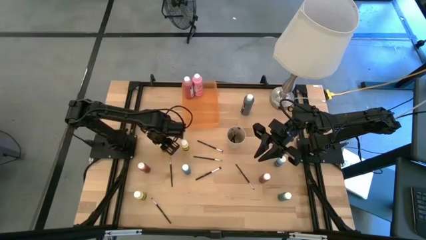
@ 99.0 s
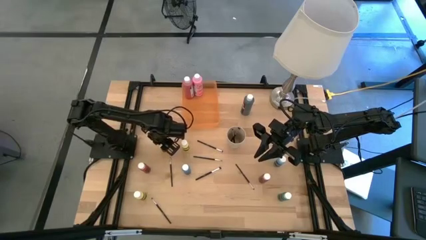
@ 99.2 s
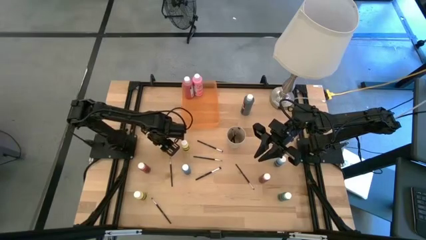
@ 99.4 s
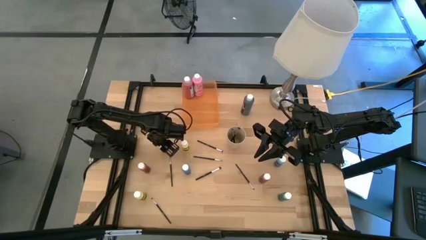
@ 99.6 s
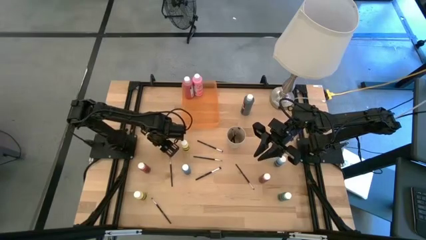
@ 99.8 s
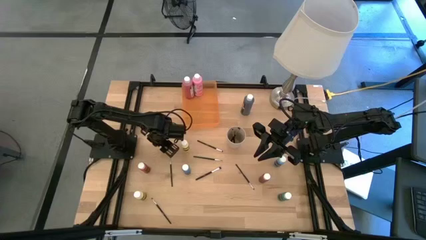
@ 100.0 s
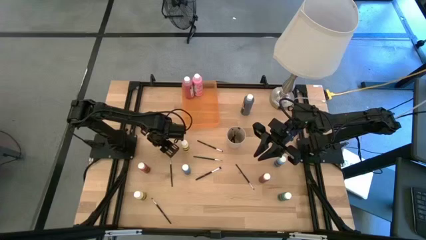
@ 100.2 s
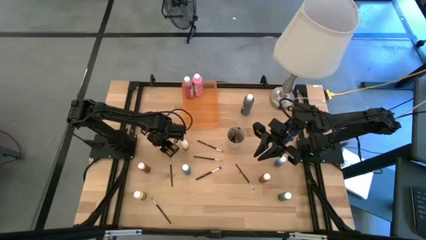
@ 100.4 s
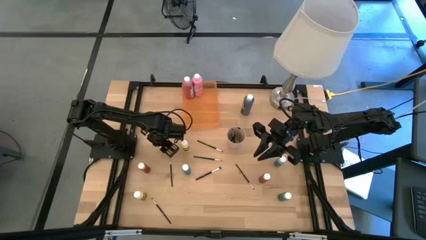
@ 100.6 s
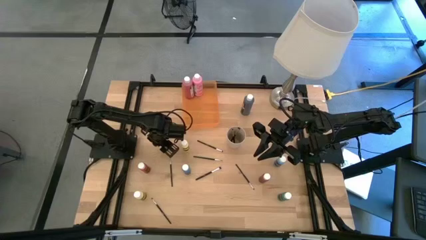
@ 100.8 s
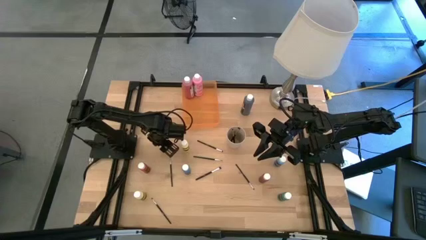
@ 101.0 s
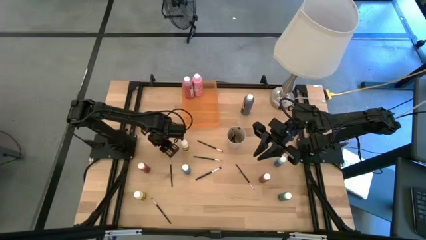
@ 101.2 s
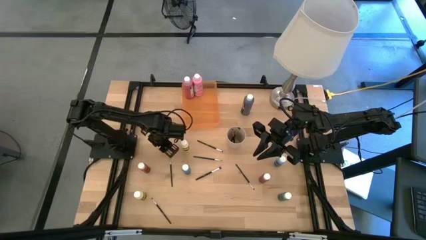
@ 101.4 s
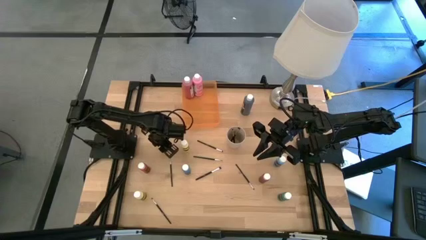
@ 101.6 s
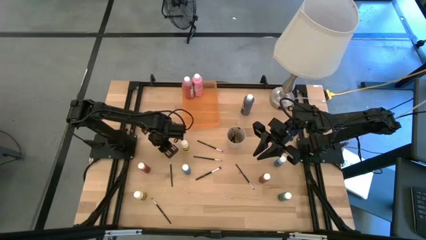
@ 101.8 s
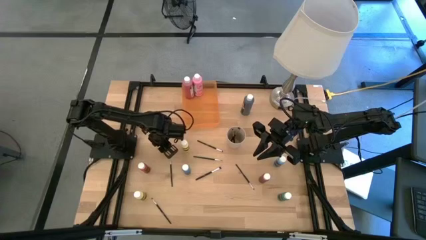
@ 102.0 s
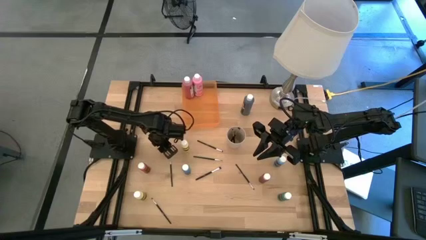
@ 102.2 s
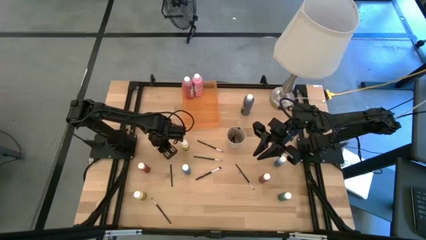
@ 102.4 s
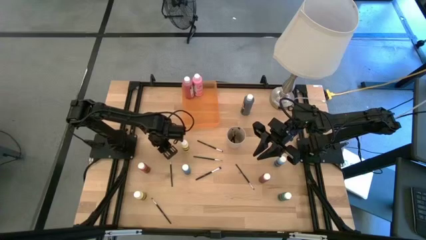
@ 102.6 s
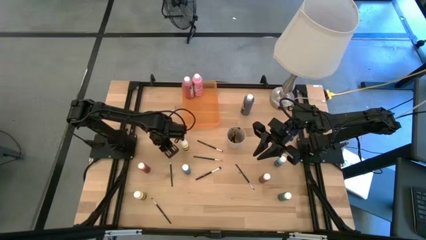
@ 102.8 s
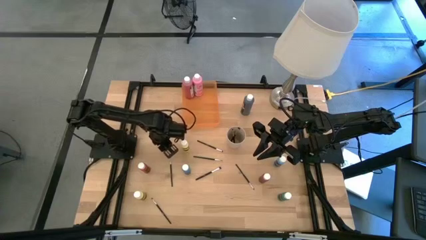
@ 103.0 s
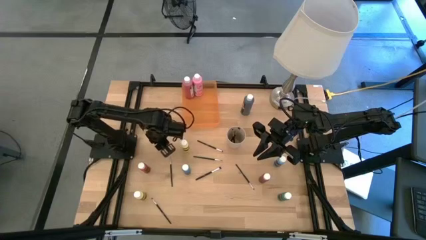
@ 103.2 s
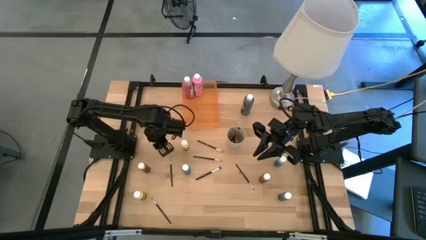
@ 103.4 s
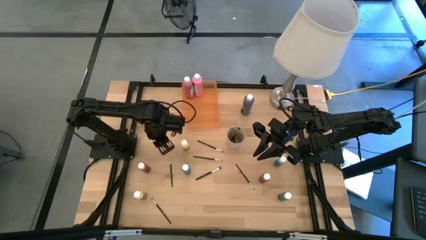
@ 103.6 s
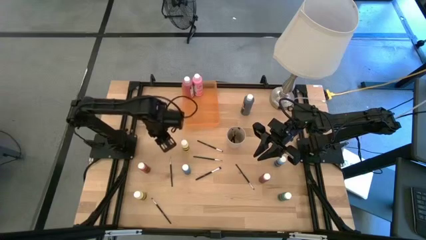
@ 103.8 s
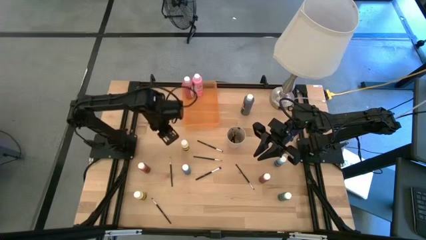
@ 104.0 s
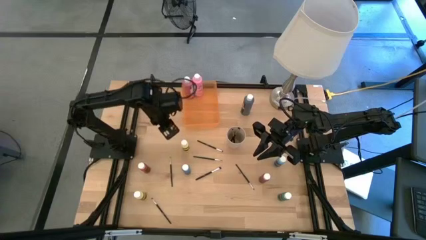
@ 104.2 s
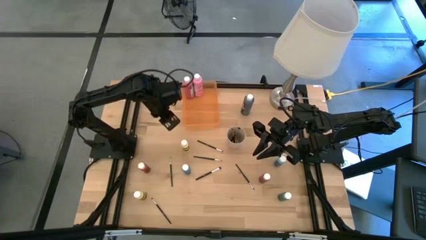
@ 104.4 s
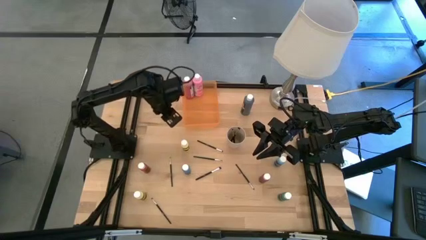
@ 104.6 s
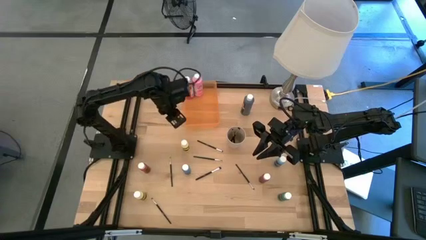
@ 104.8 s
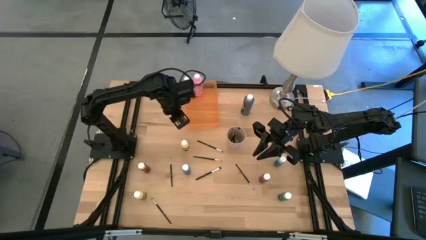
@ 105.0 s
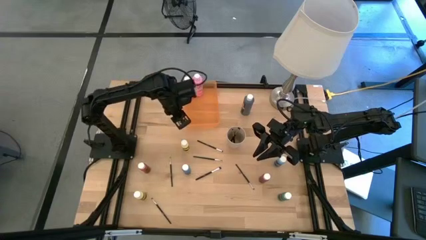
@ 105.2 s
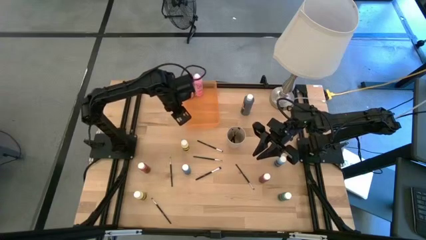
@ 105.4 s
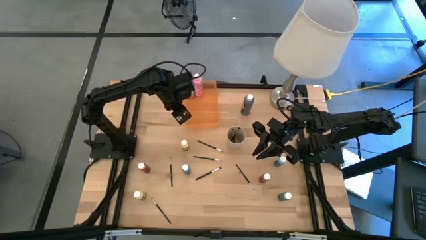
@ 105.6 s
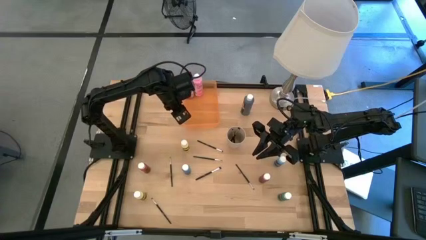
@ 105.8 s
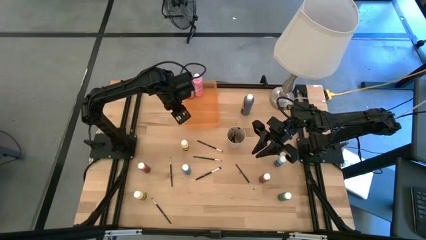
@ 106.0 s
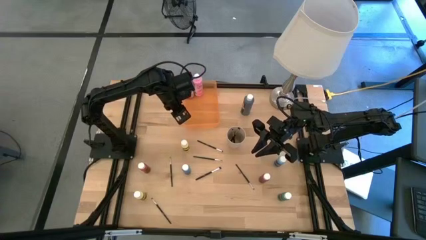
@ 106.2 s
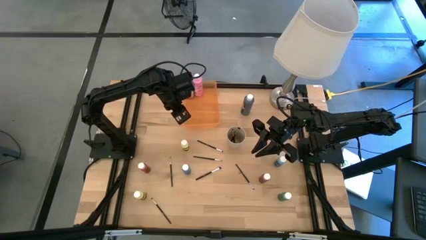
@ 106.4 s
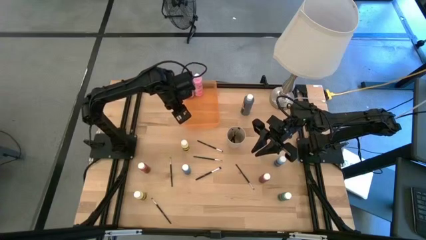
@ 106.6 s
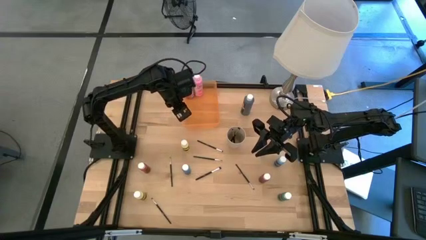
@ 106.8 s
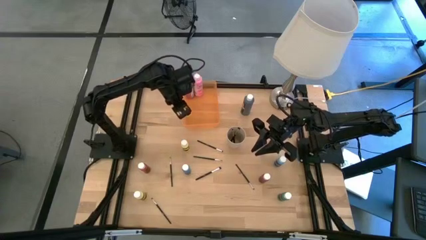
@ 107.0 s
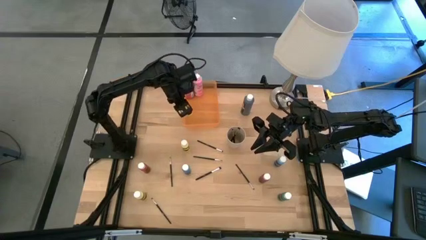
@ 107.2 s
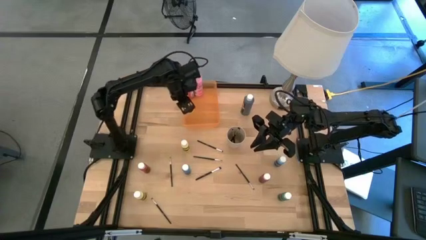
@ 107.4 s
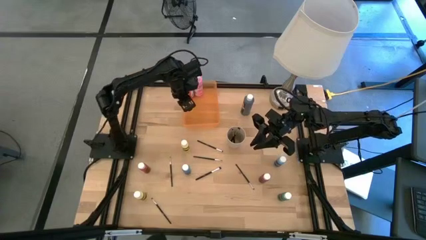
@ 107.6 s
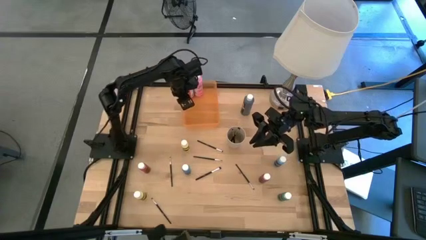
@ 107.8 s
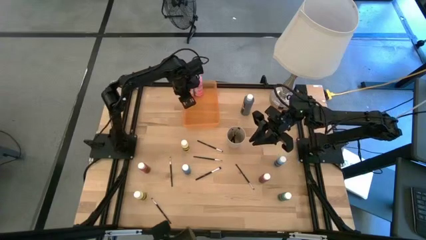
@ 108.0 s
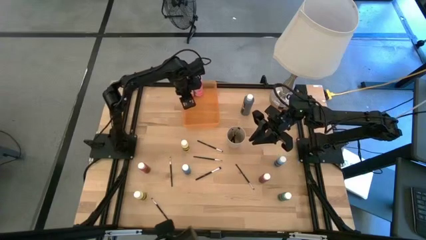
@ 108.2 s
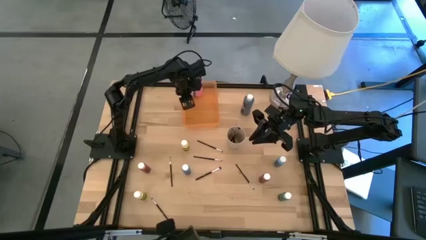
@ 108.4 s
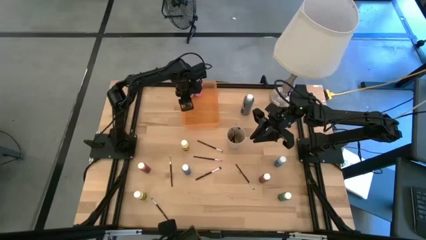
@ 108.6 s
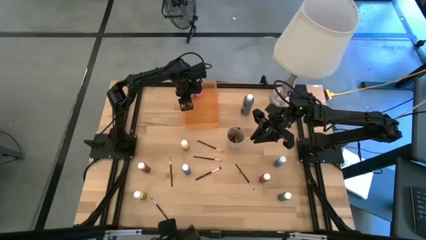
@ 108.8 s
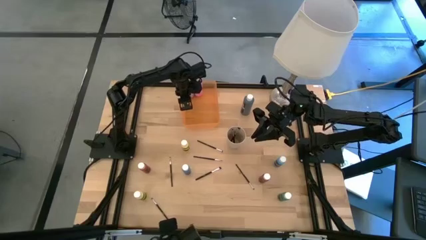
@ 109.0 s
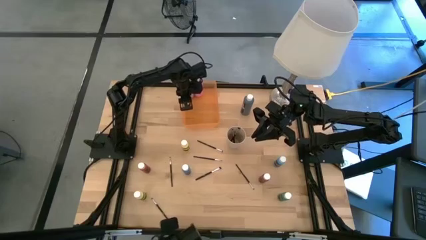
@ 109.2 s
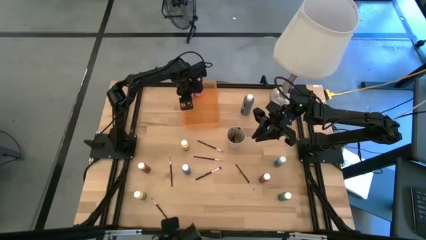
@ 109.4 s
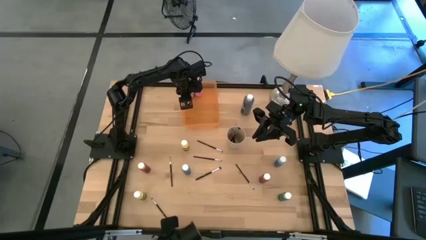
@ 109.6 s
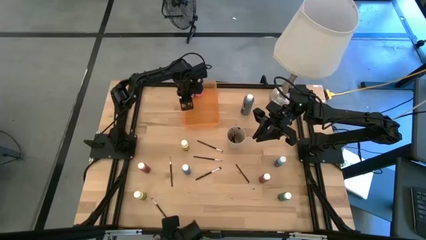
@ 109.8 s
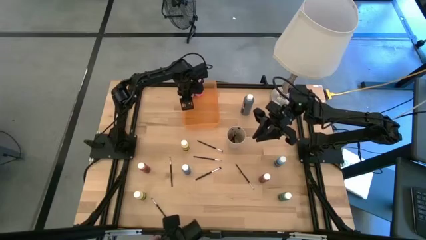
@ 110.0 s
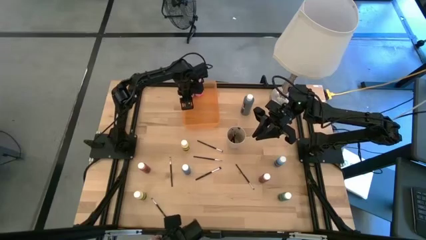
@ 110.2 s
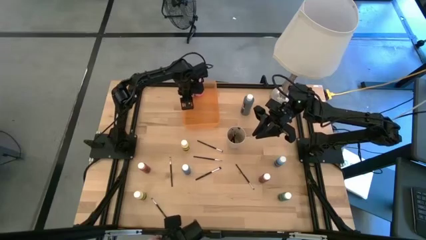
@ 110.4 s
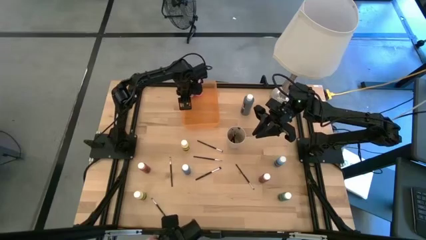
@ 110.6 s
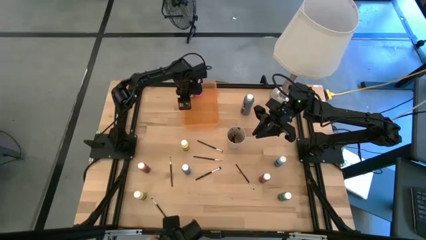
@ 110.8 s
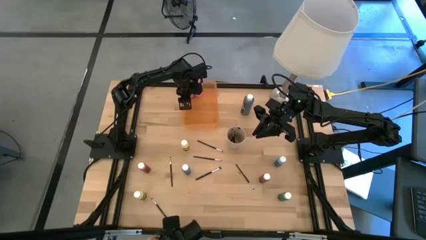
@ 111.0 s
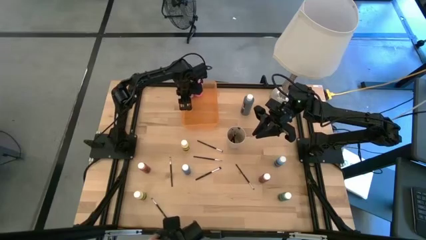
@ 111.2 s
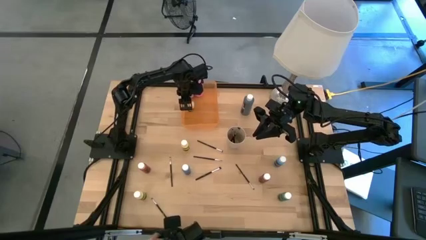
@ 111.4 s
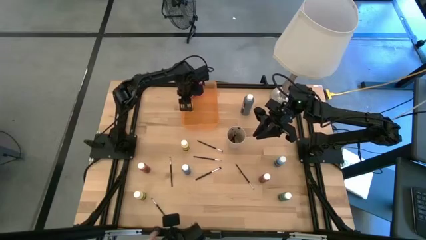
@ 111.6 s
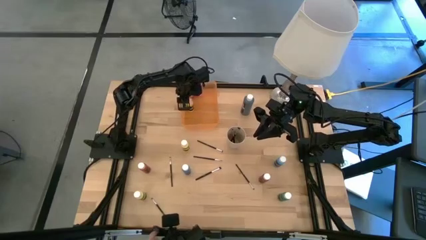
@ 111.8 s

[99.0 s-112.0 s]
Task: Pick & Place Paint Supplies
Put the small yellow paint bottle into the orange bin

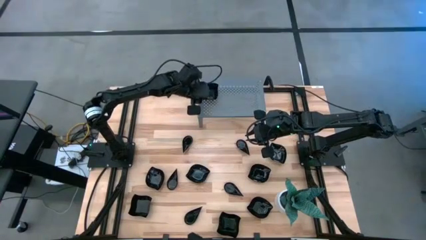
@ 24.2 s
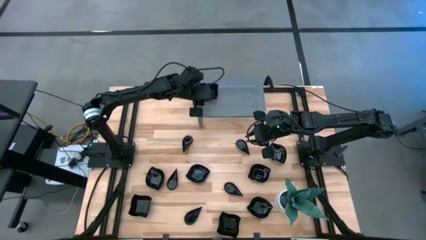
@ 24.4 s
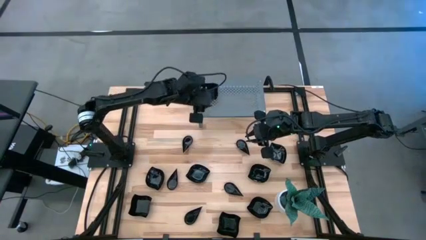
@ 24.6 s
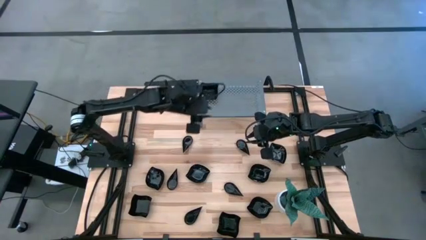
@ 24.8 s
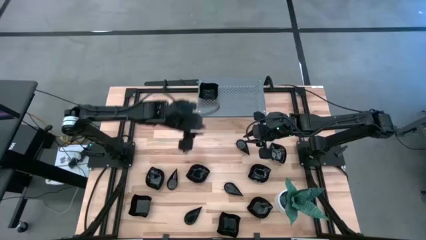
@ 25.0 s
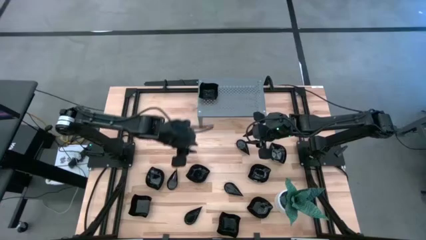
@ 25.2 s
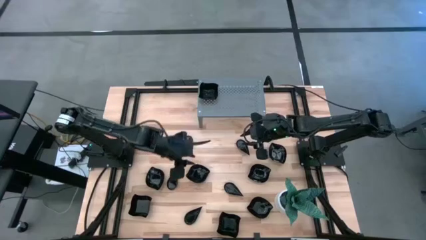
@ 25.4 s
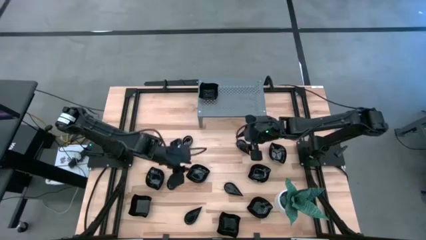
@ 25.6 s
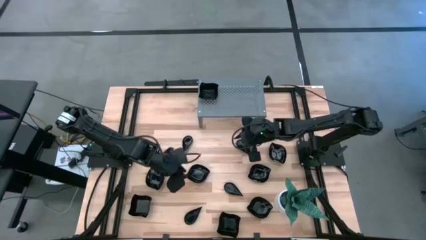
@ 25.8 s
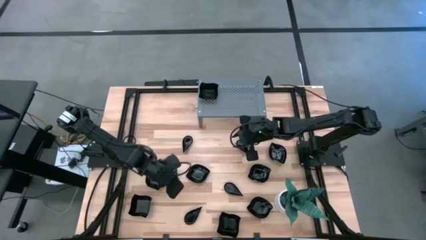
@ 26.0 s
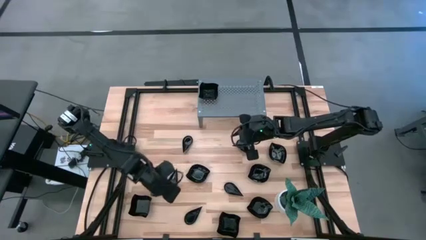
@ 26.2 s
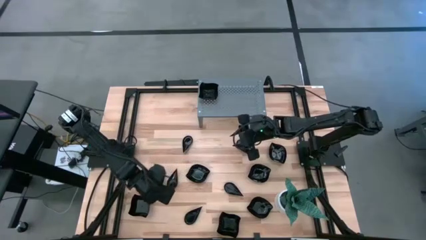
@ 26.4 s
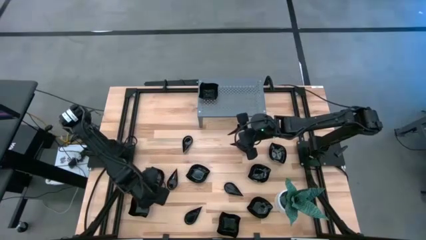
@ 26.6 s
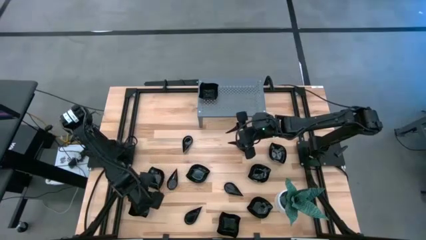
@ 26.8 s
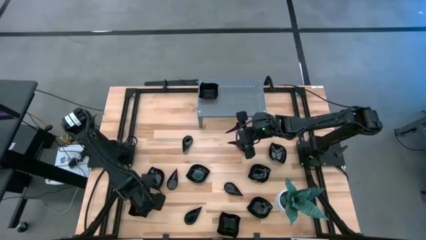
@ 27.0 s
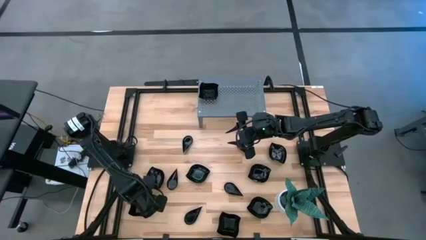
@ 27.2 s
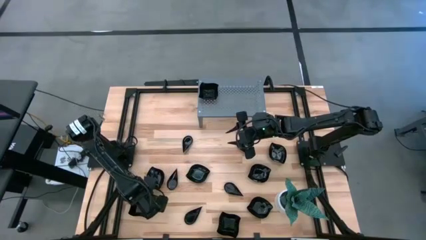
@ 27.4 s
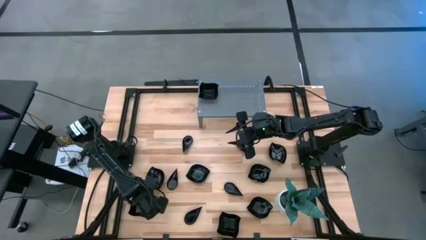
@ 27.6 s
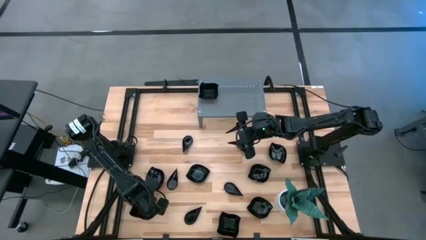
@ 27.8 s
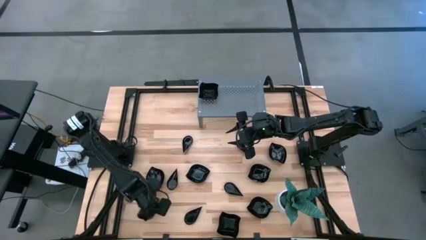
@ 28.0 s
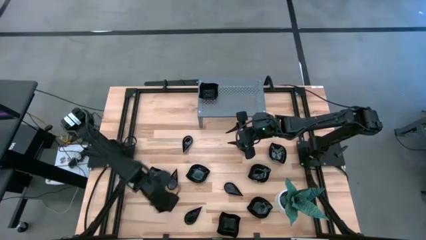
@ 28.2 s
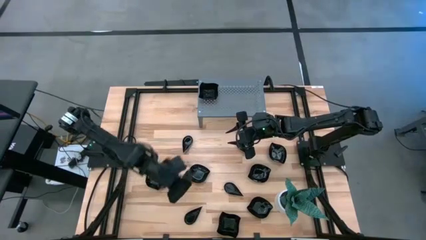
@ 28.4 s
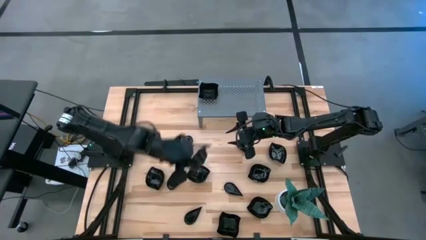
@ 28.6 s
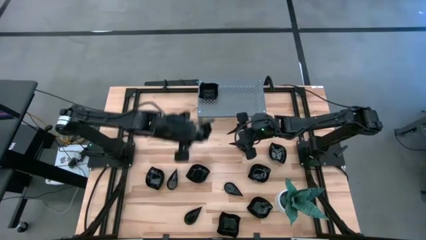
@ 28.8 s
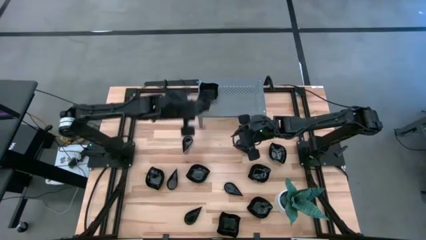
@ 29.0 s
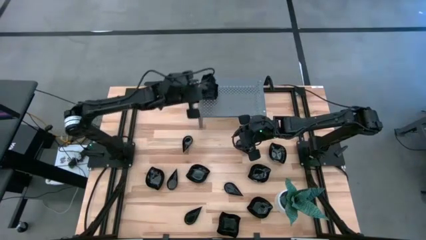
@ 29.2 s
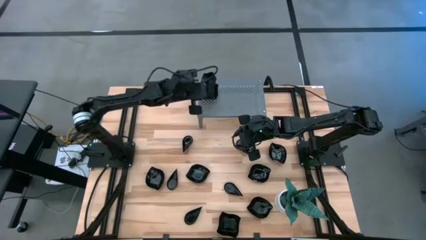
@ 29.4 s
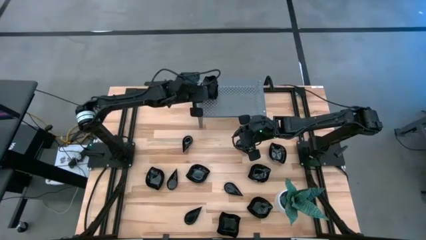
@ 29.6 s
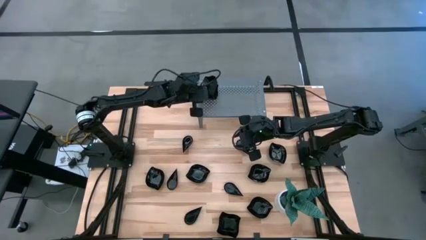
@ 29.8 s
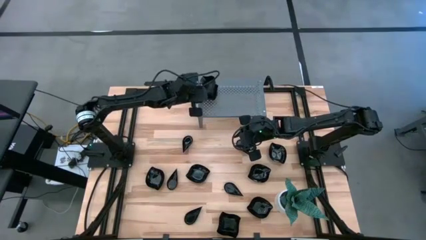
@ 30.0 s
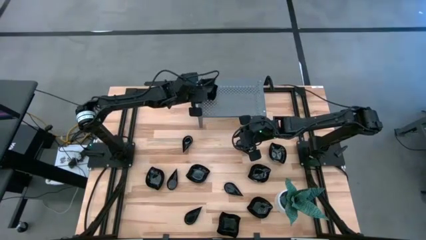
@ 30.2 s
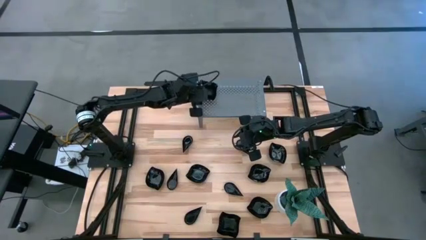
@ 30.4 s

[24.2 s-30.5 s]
Task: Pick & Place Mini shaped plates
Stack the distorted square plate on top of the distorted plate on the shelf
